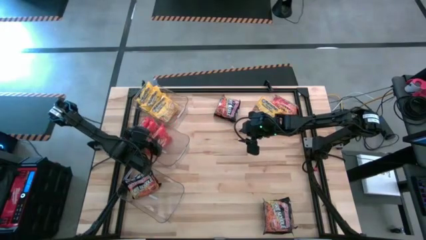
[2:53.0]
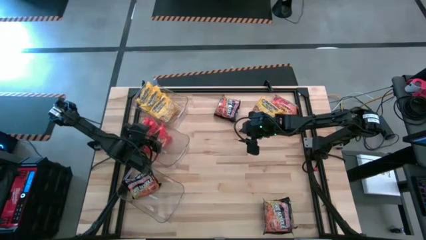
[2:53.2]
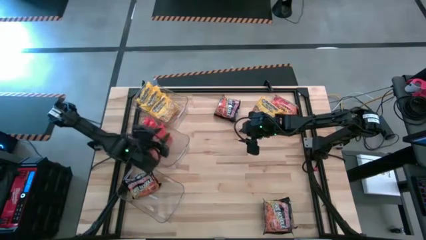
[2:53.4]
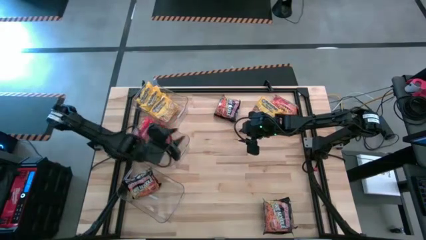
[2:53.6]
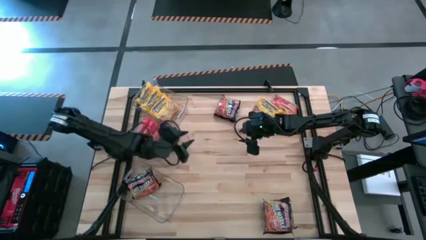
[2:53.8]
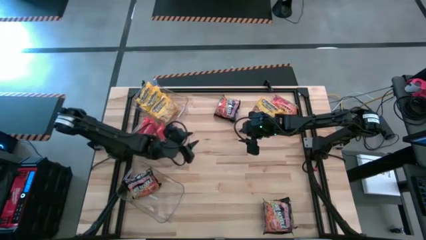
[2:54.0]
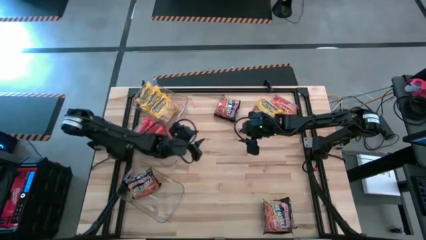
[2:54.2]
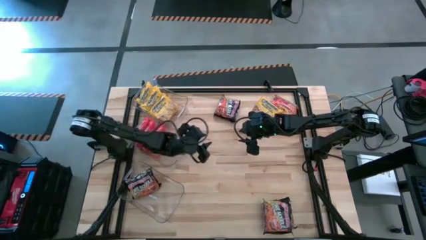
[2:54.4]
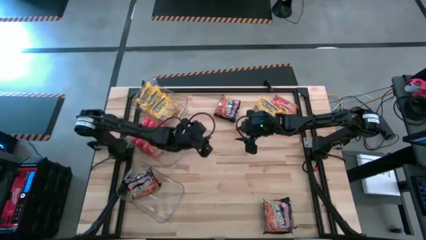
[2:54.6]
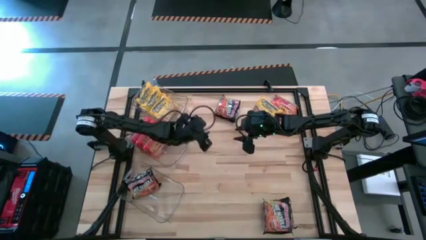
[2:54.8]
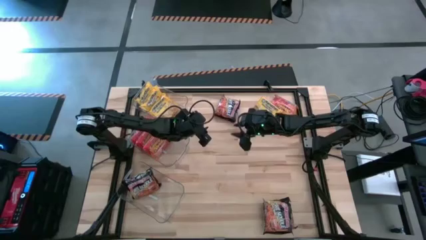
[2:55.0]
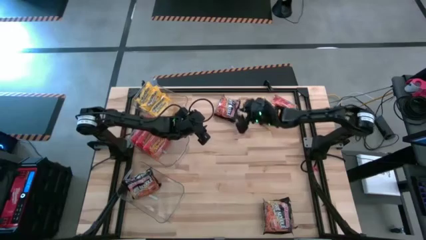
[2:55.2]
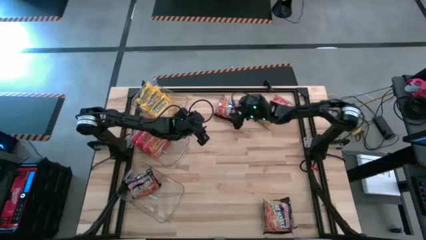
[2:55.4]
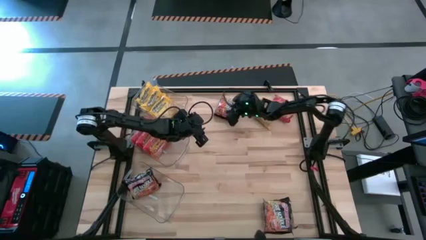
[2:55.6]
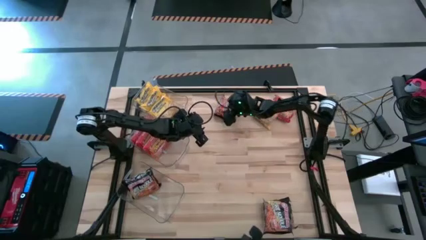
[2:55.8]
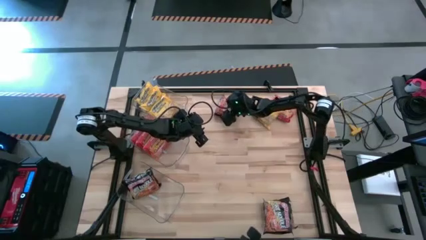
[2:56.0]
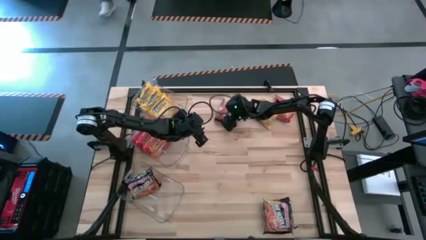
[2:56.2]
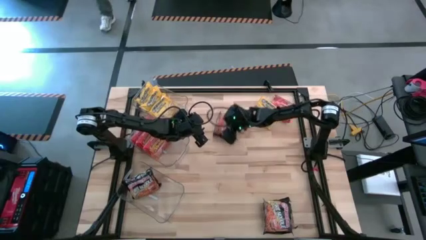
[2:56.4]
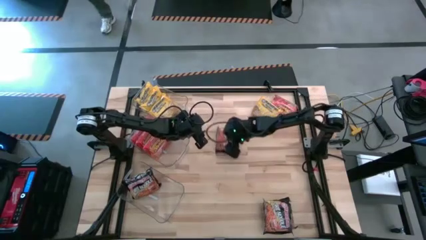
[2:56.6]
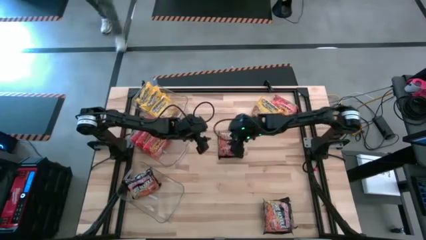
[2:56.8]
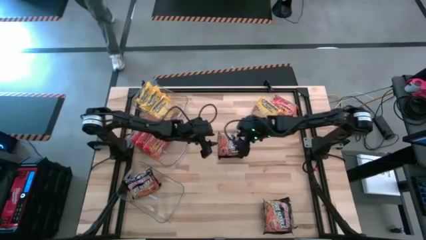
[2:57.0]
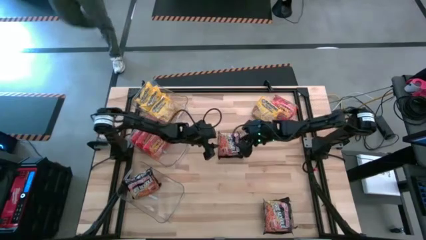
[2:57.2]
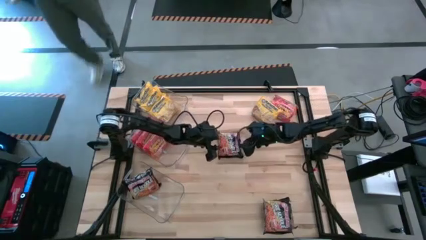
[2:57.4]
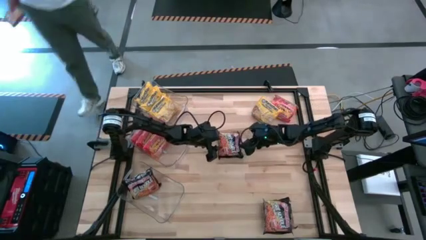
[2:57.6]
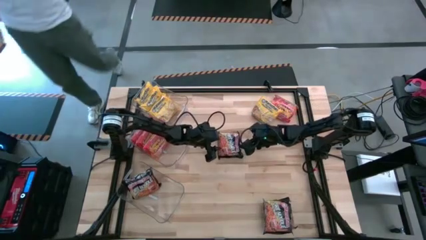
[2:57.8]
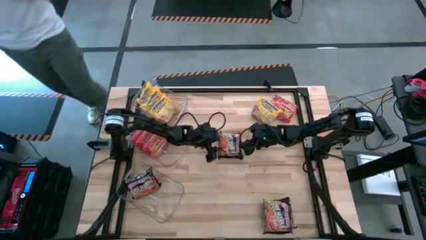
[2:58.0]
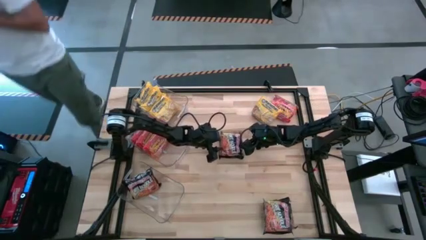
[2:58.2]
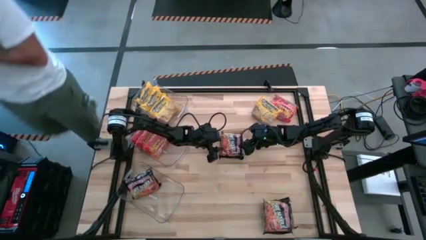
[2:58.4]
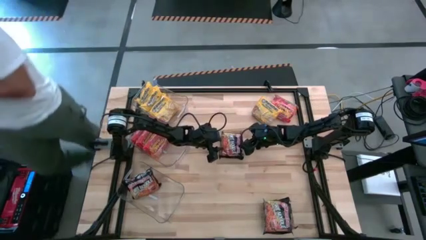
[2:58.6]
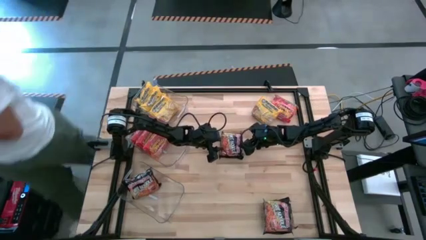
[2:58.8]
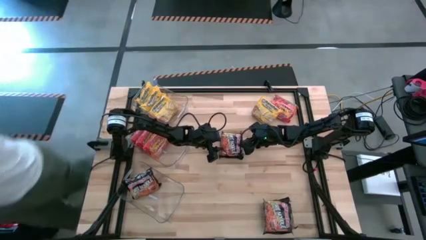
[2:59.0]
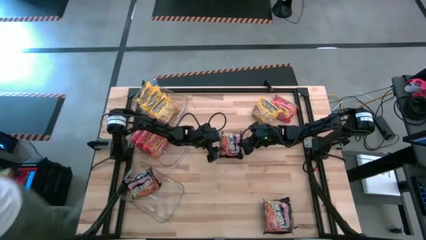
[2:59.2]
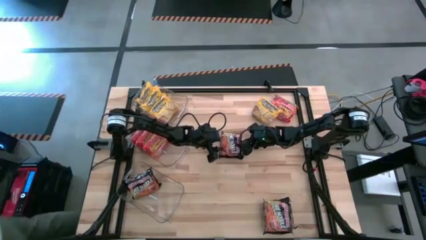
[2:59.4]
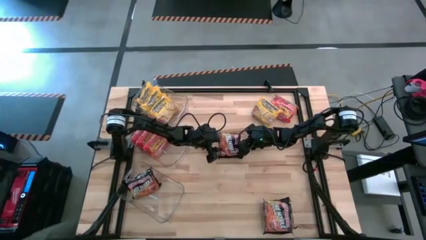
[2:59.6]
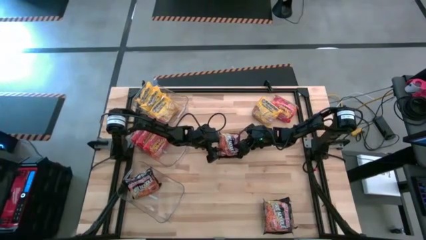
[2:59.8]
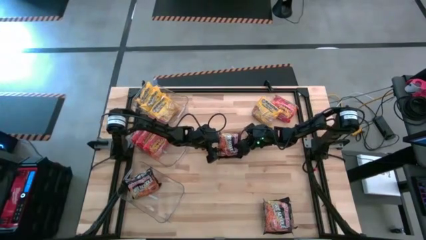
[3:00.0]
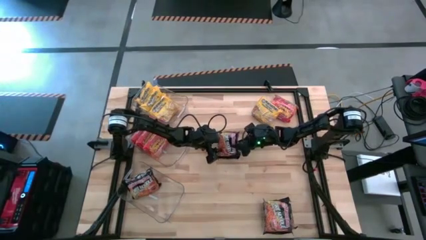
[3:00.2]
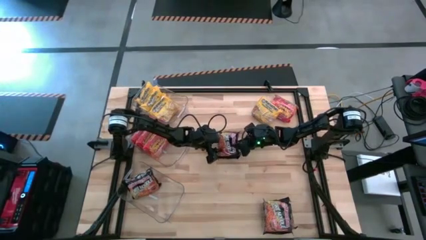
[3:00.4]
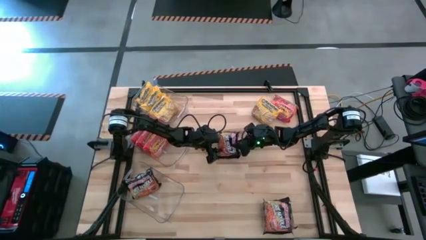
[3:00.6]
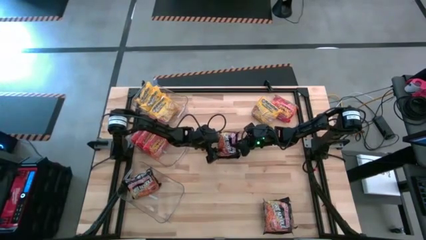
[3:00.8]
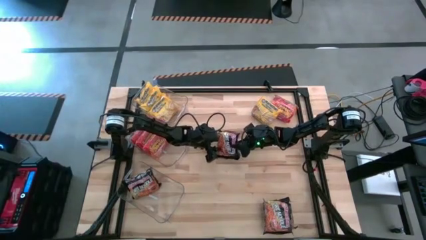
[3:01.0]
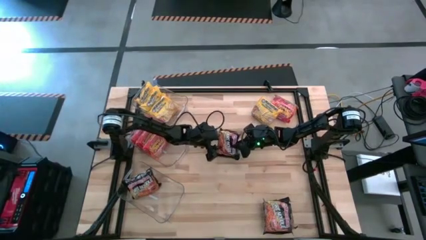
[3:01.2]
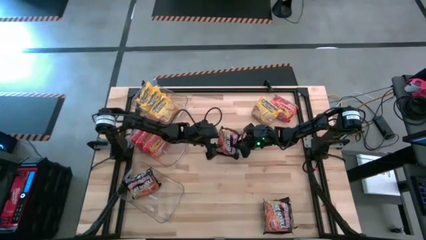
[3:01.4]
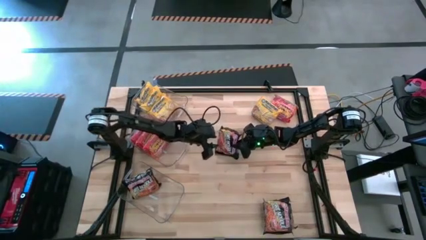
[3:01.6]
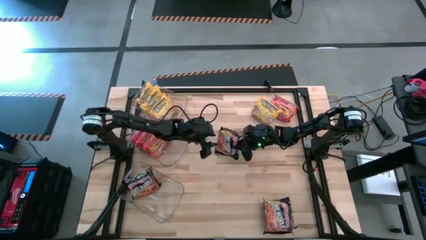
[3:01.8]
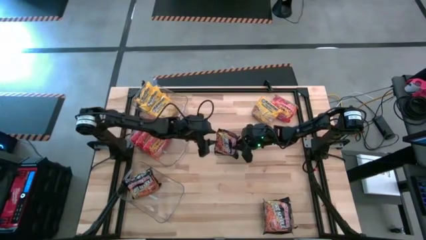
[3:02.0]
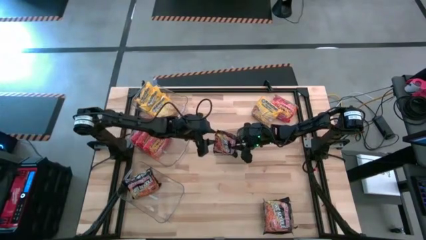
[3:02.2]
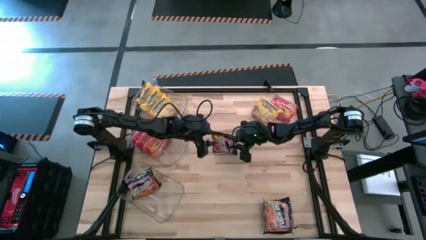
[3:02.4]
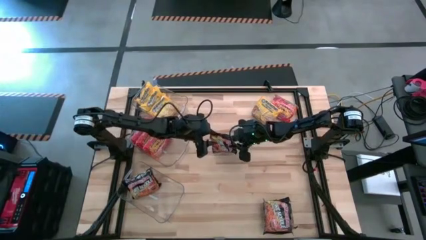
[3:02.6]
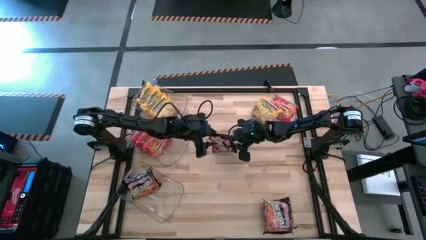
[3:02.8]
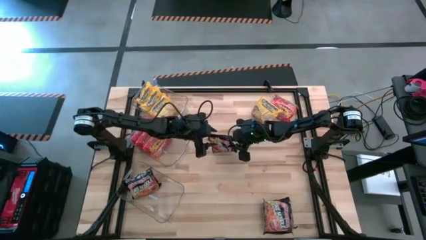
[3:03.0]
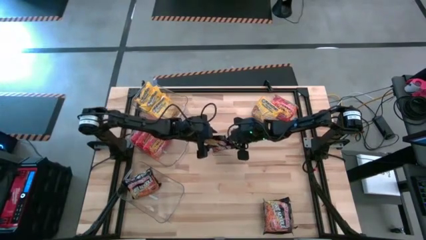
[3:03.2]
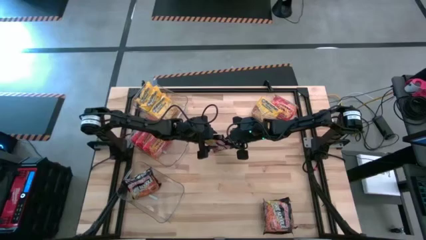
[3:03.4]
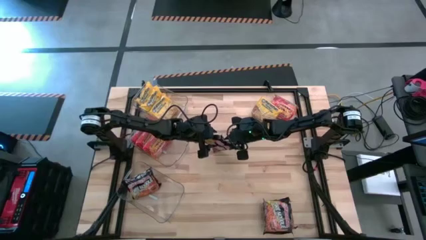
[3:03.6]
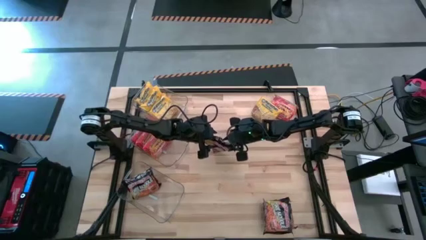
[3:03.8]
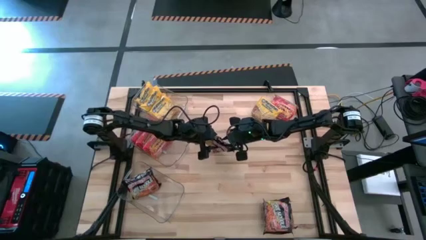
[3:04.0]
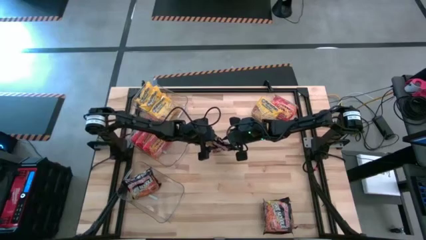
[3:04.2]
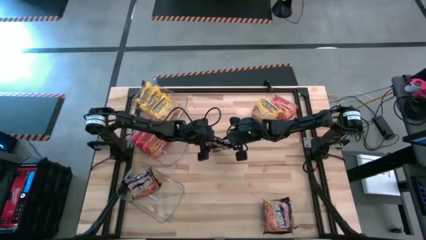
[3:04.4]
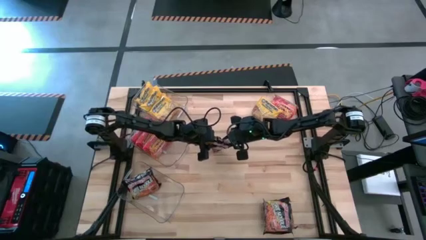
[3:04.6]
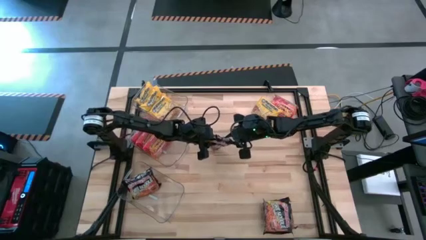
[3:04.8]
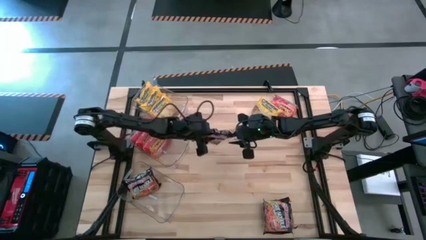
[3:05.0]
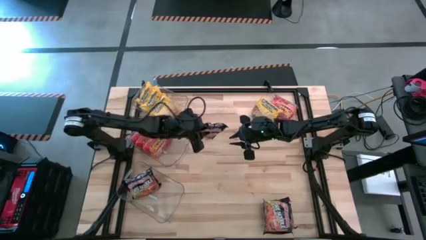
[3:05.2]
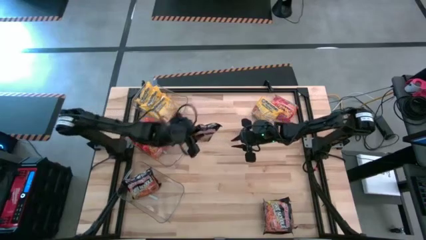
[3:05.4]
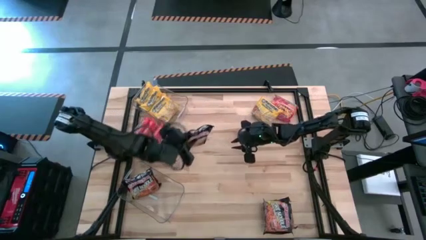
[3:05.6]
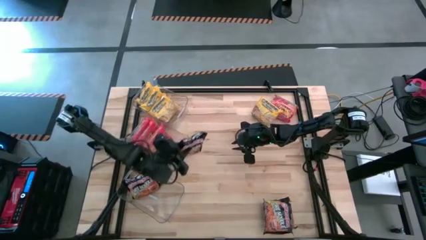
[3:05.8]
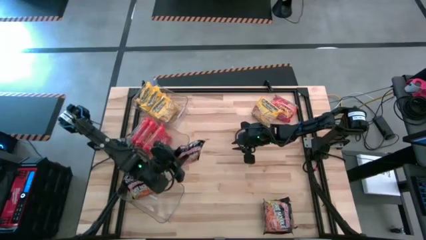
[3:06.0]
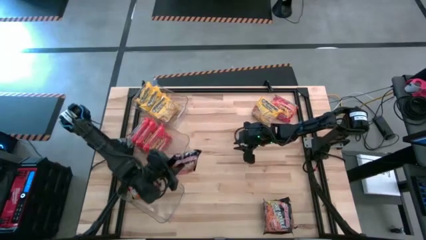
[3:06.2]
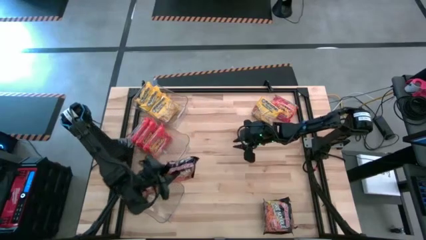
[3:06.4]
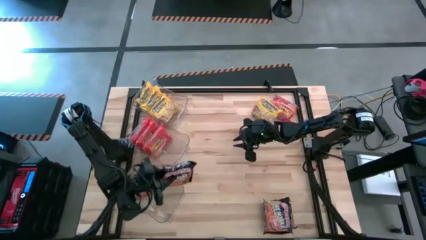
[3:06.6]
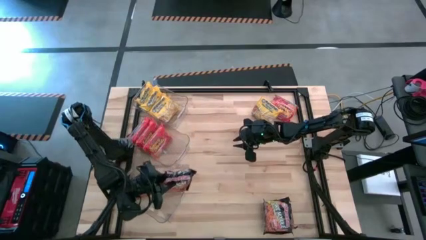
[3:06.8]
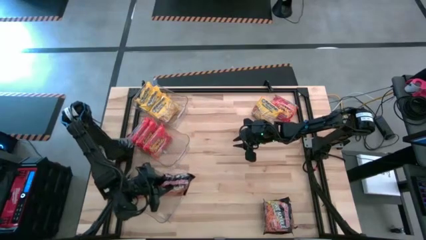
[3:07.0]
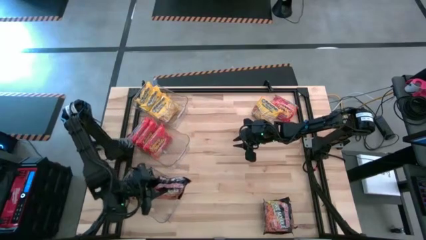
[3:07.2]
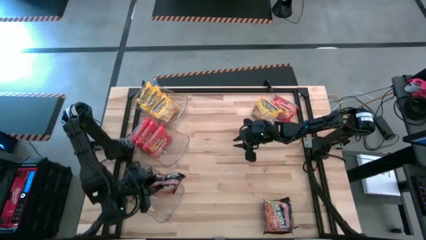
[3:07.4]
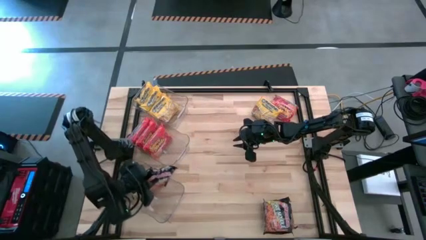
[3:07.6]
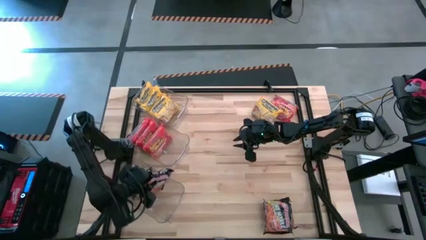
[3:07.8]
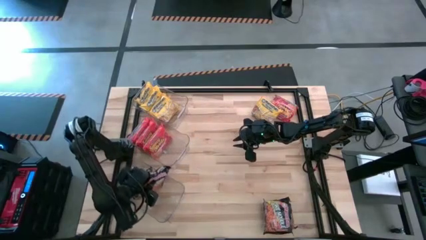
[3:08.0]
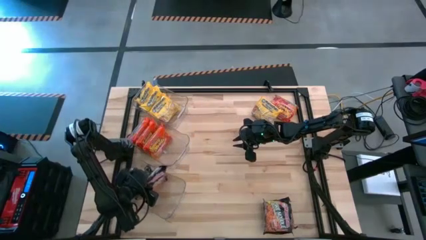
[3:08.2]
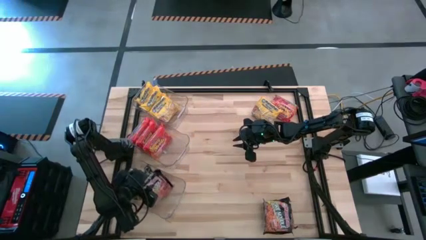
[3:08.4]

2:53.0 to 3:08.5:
Task: Sort Maruchan noodles
Put the black noodles pack into the bottom transparent bin
